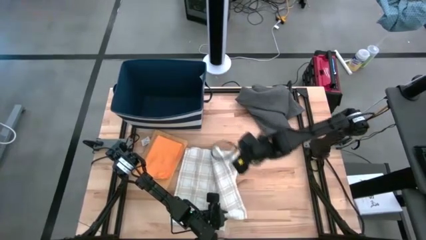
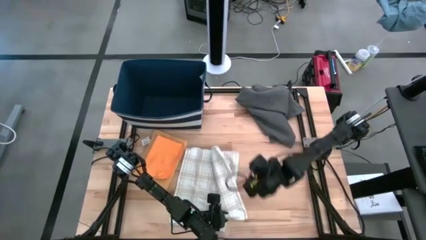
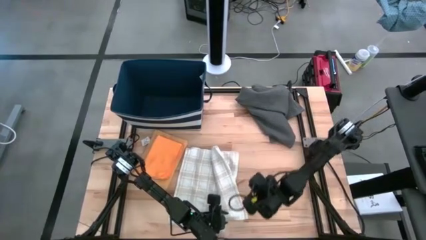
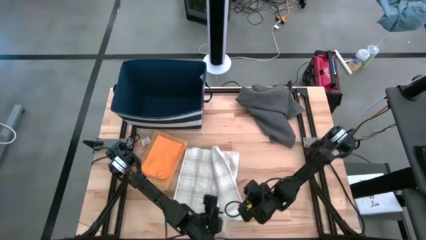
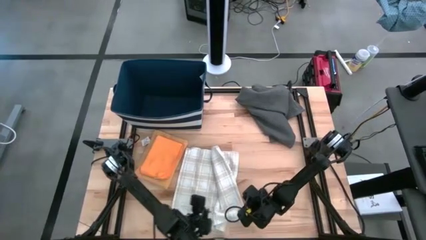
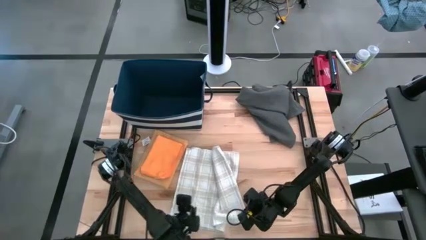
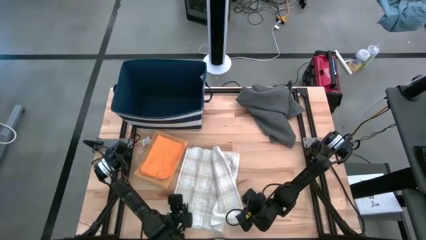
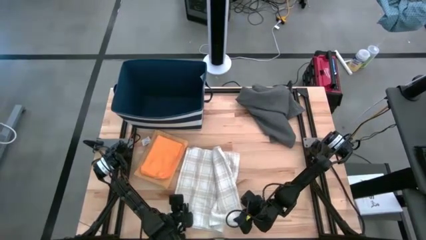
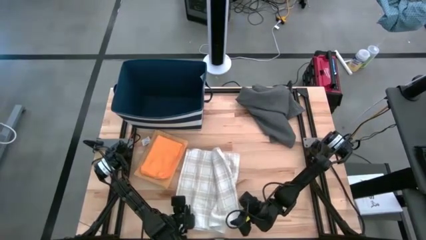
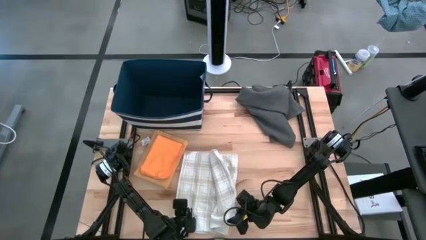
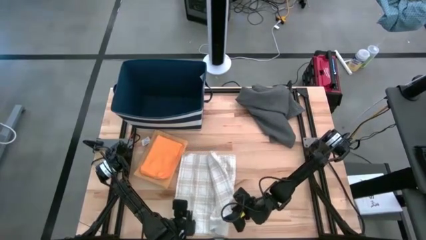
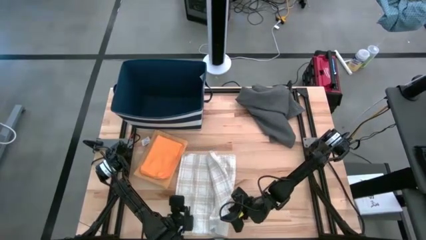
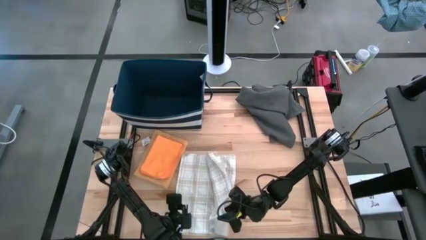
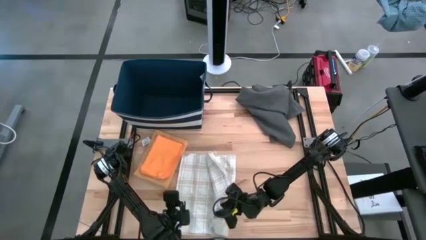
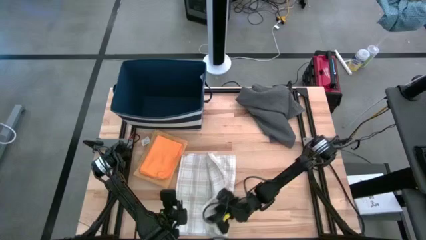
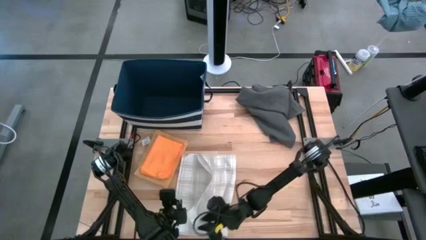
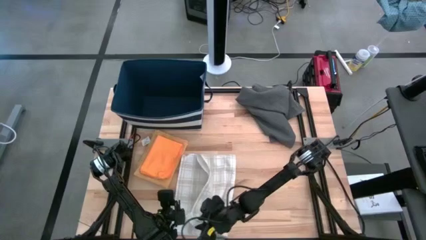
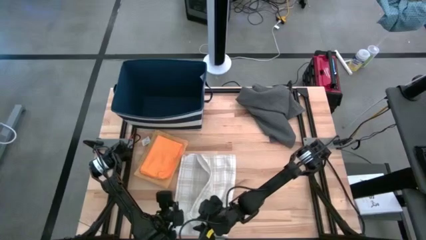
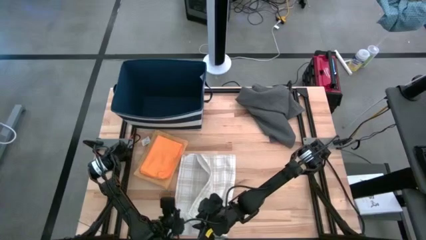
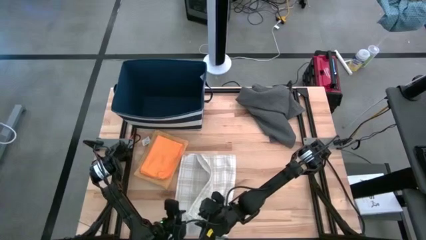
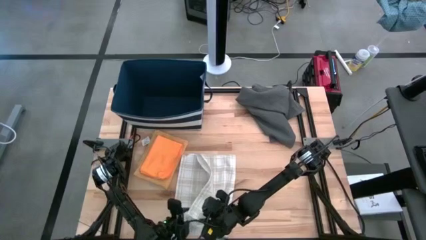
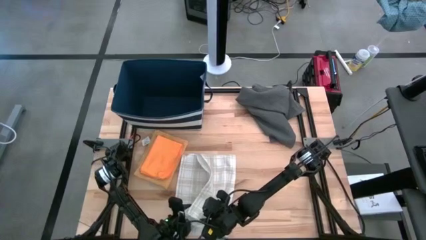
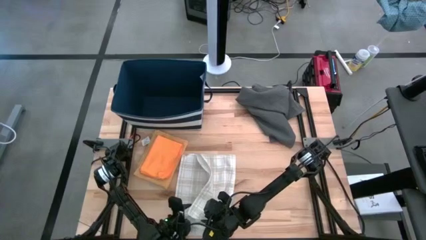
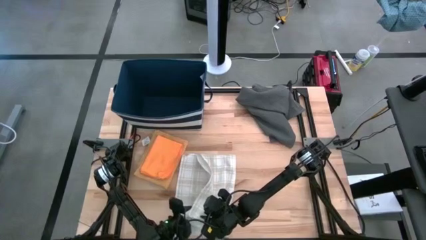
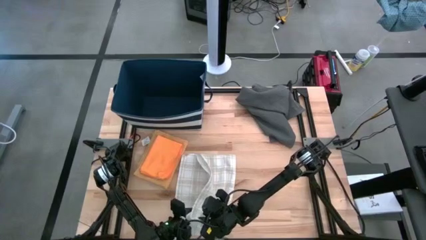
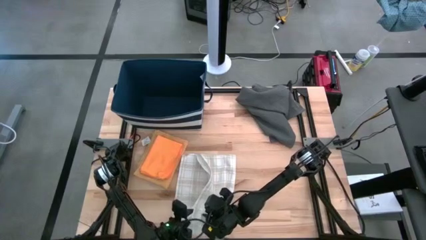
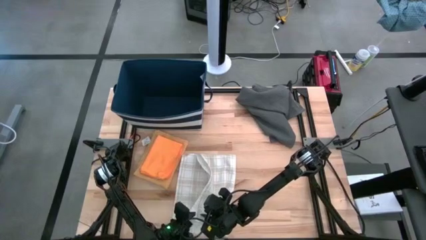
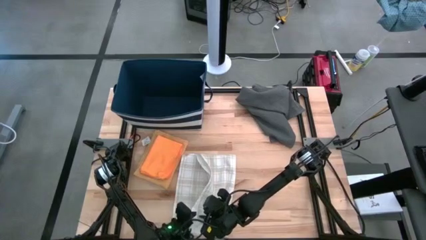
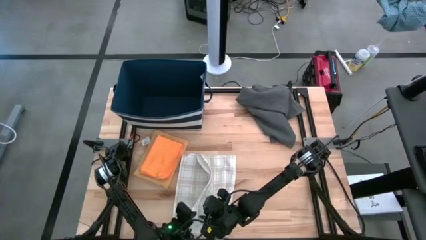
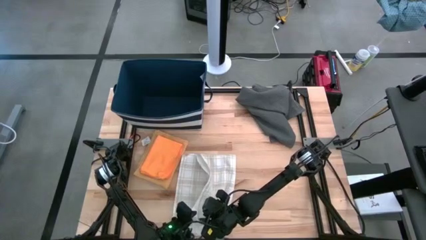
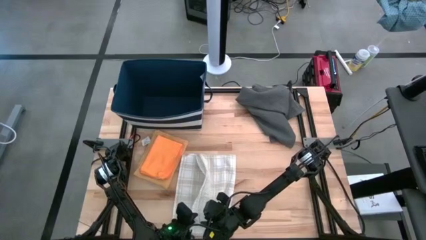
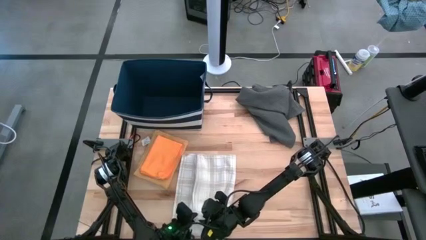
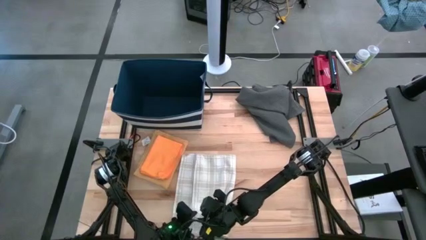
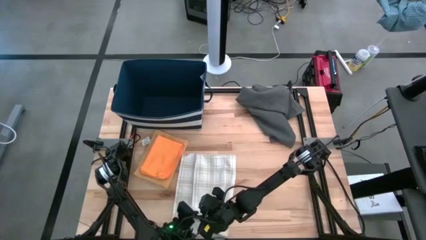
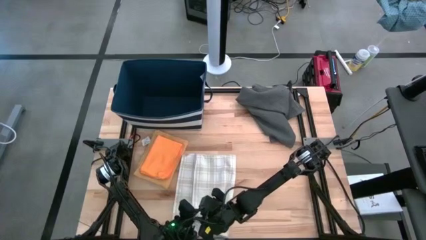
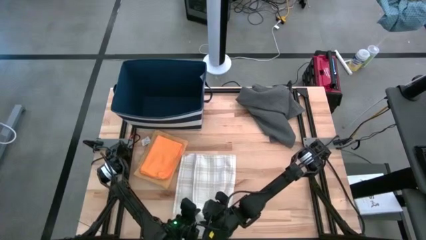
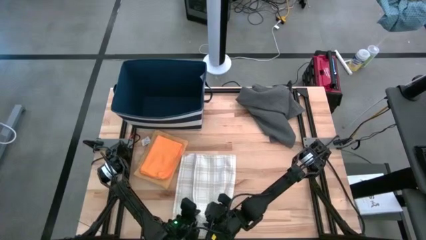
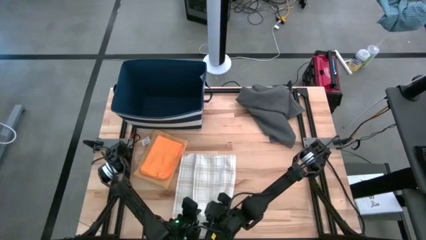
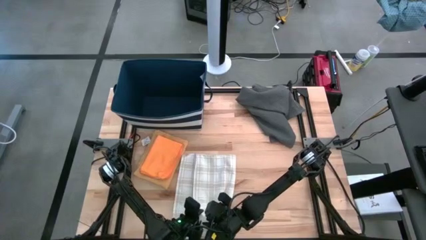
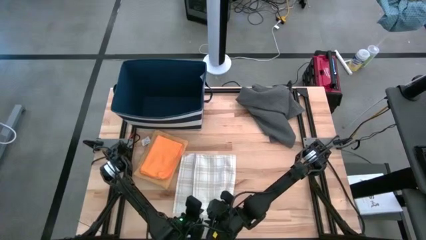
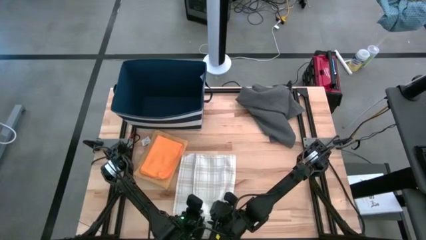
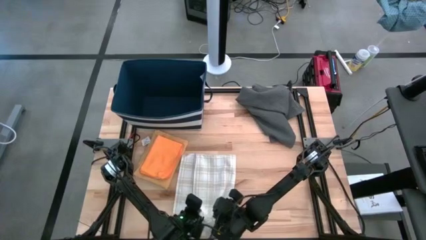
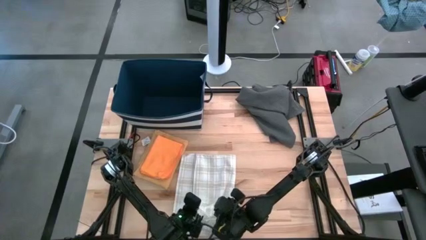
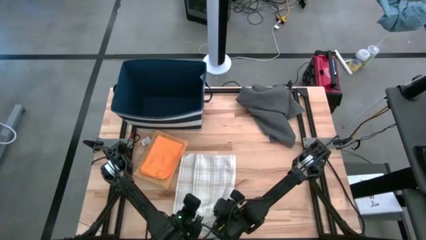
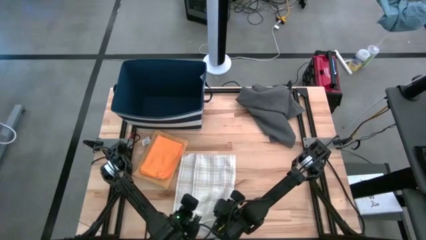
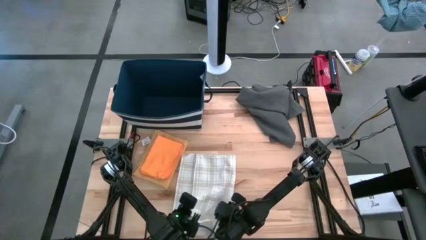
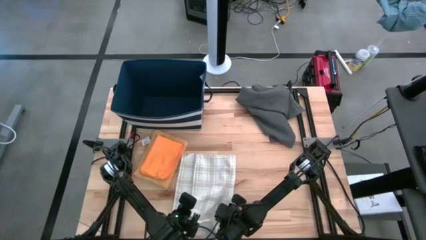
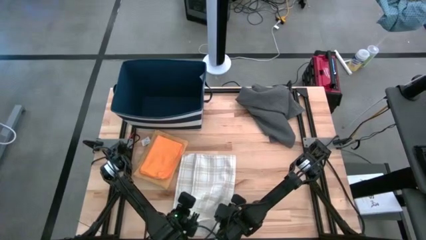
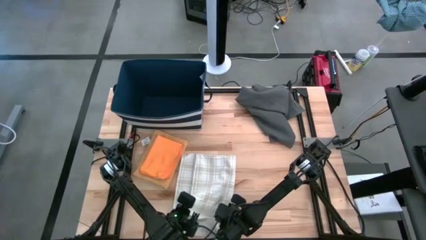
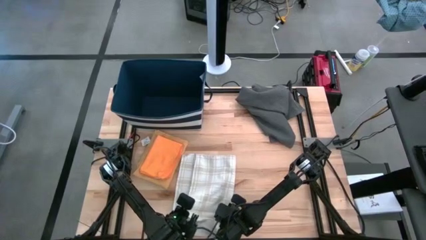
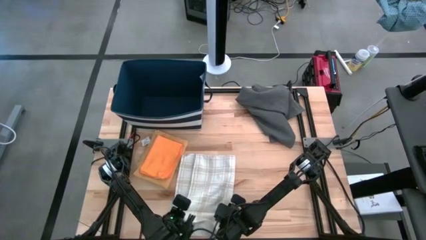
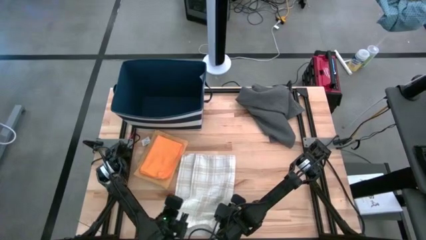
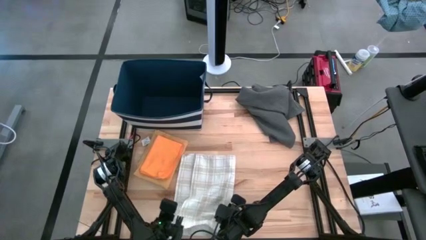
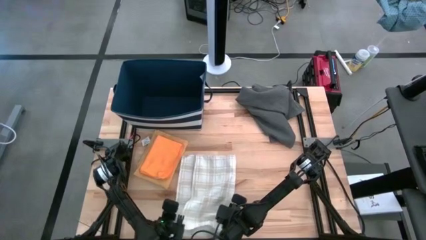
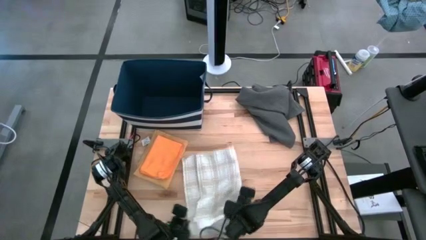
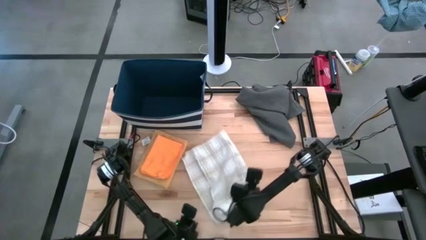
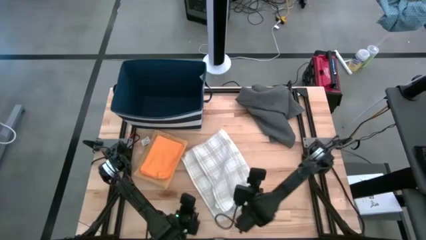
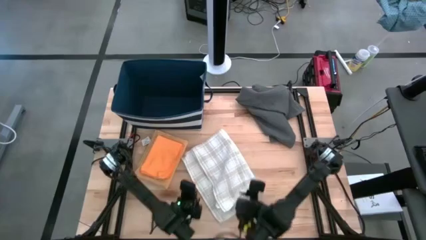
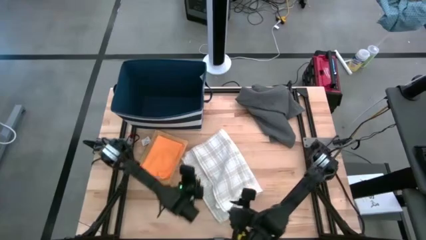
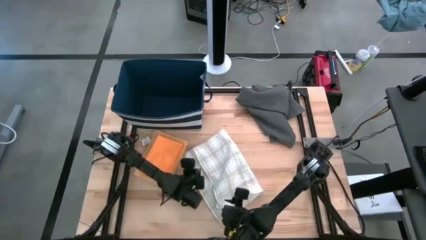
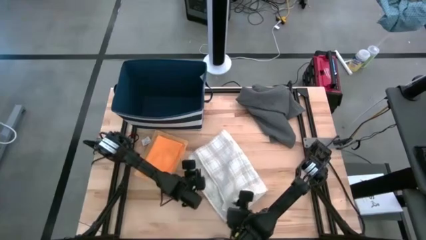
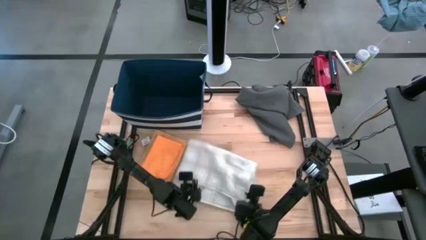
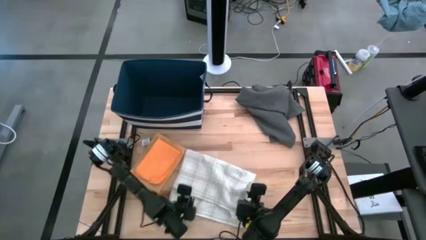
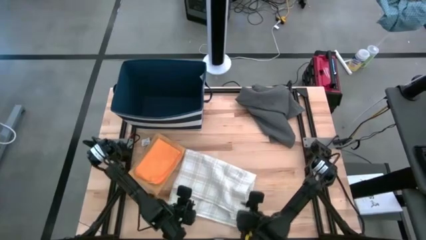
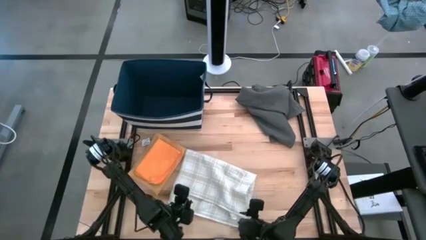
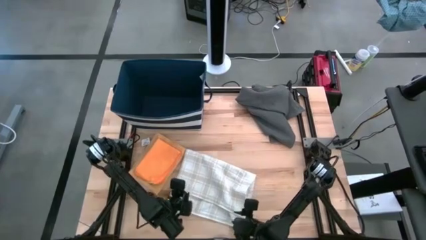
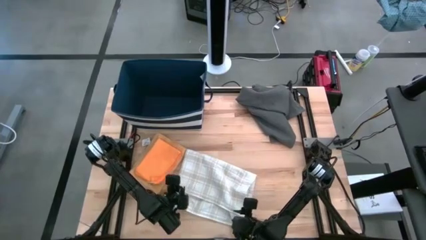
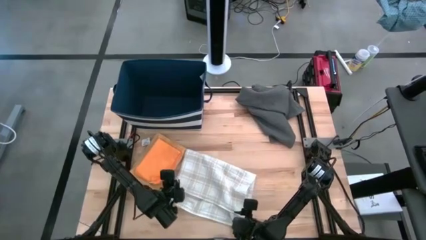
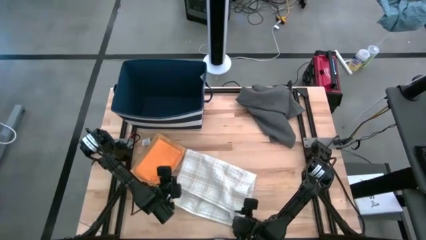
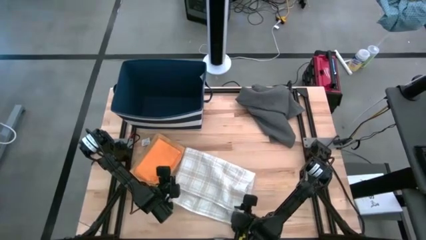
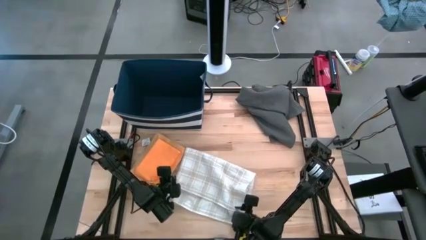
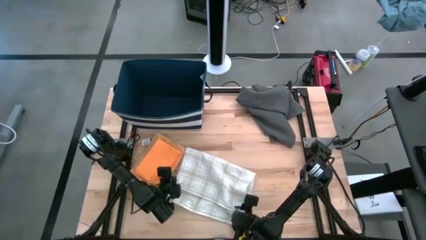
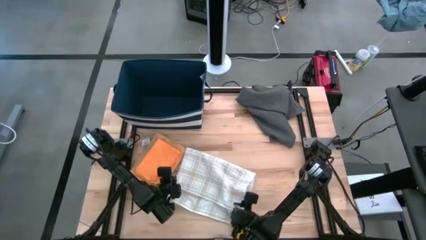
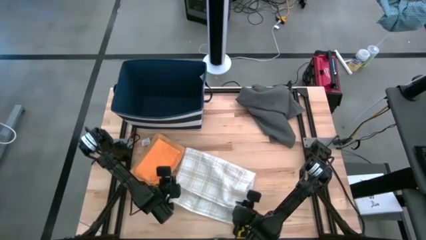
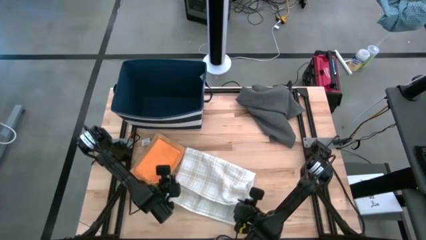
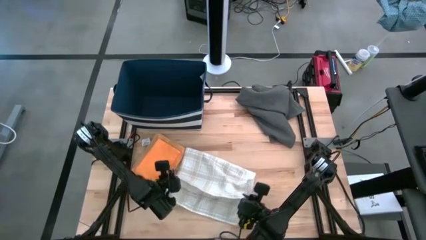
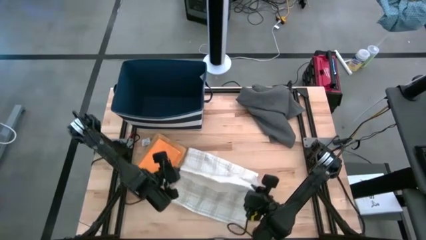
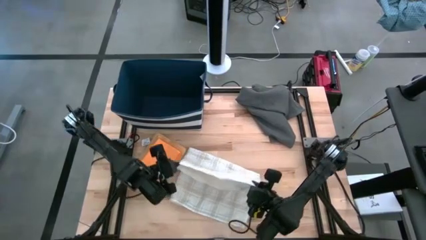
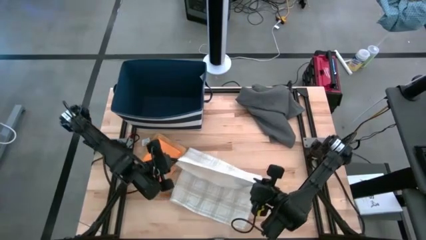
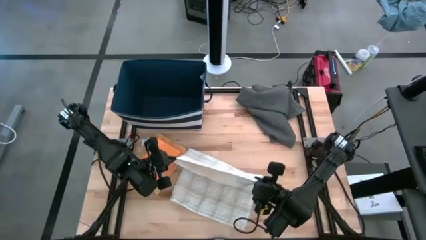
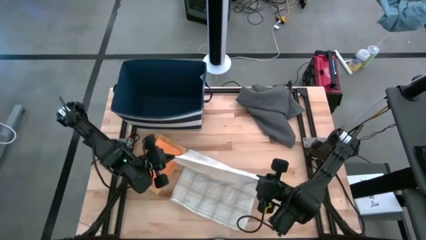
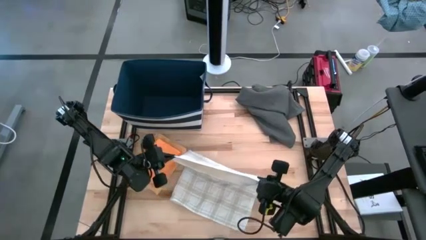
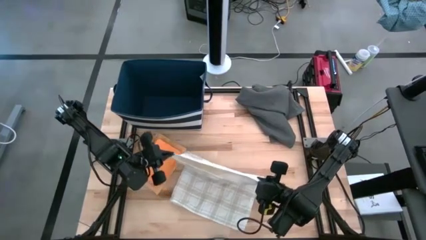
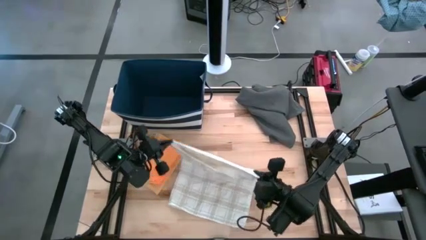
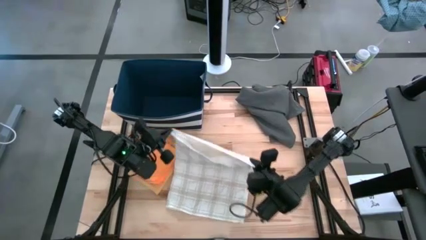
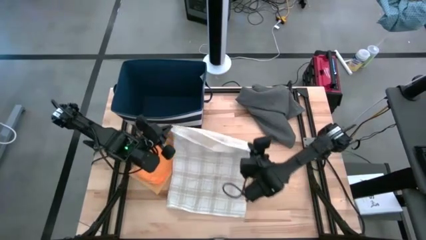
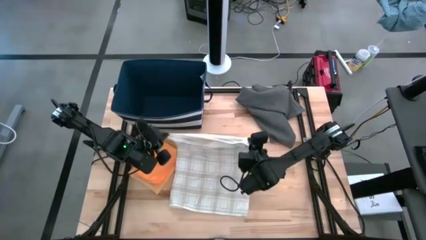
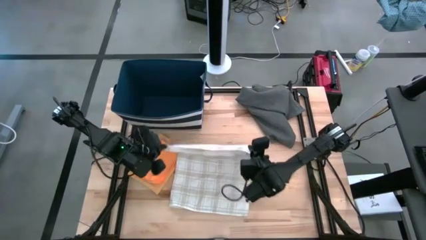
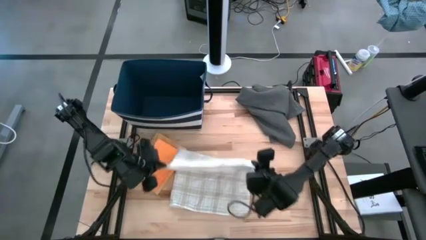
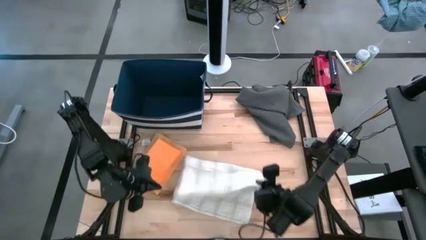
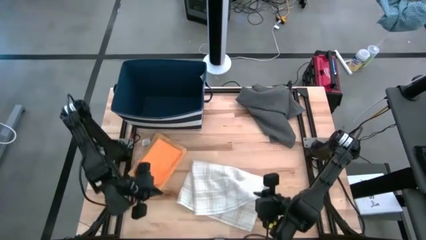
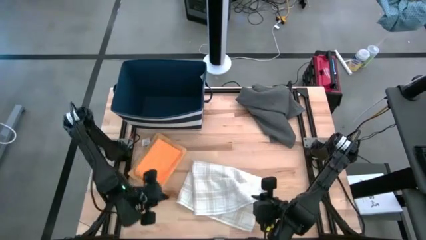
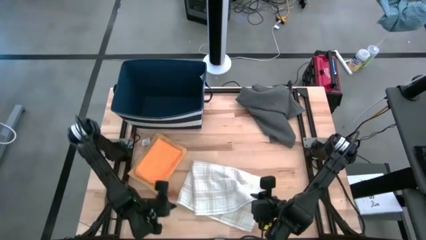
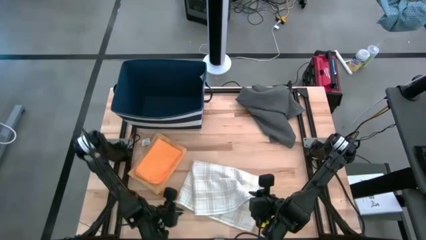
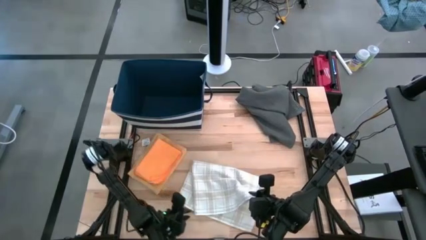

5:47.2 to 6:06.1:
Task: Fold towel
Fold the white patterned kitchen towel
